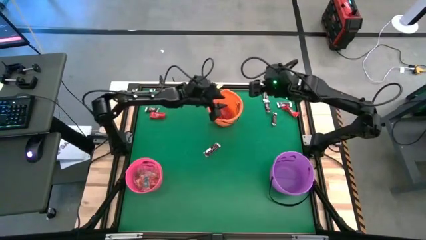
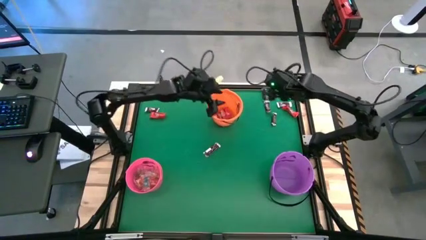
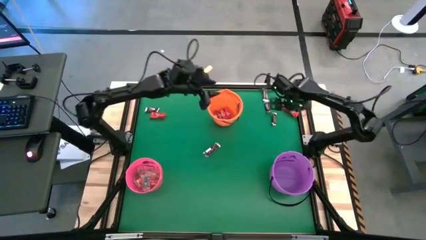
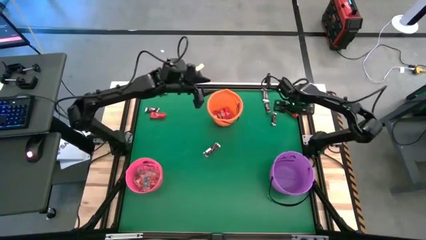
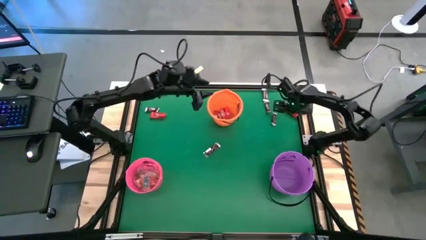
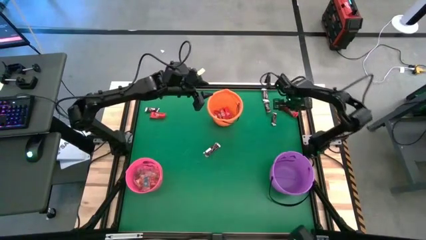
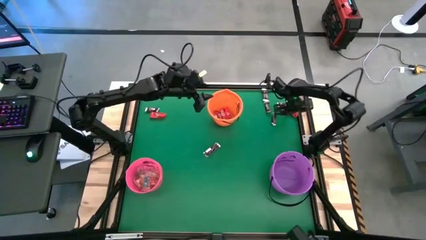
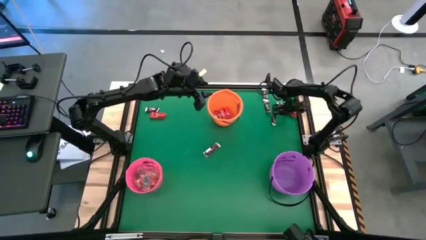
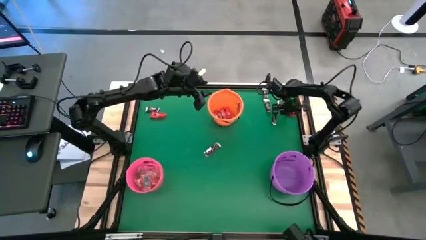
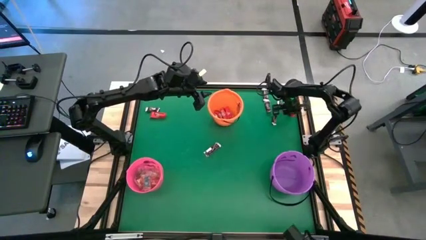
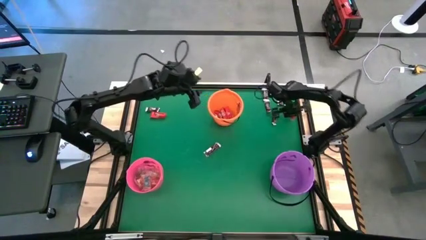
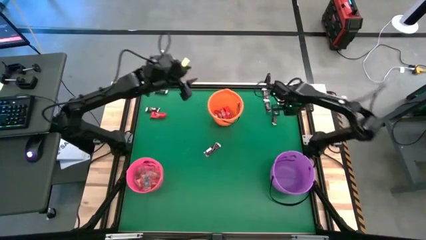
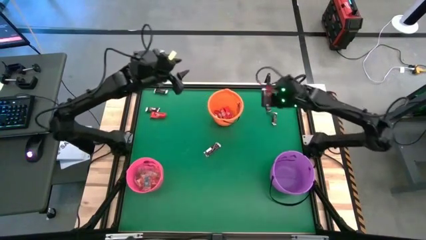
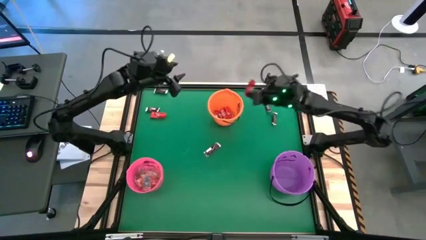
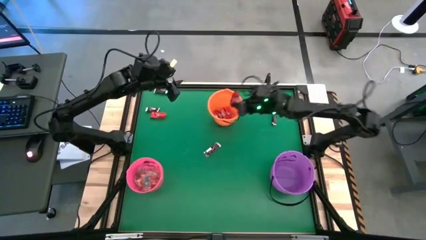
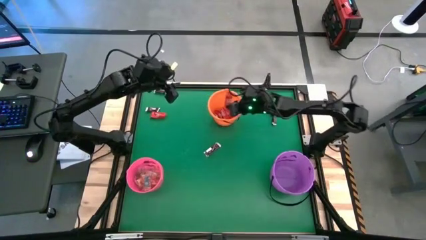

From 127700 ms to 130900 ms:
Task: Sort candy by brand, put in halloween buckets
Put the red chocolate into the orange bucket

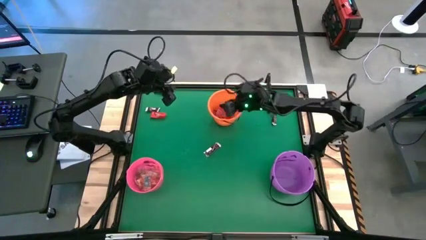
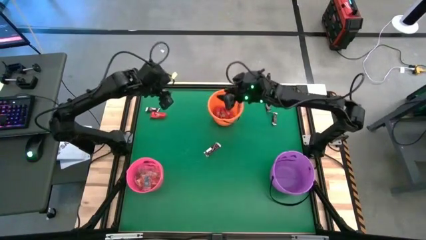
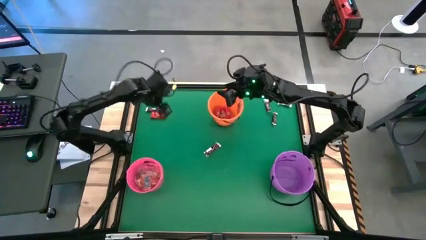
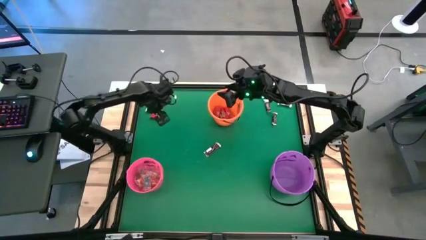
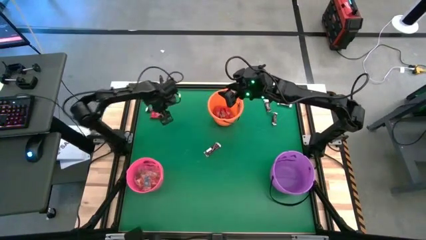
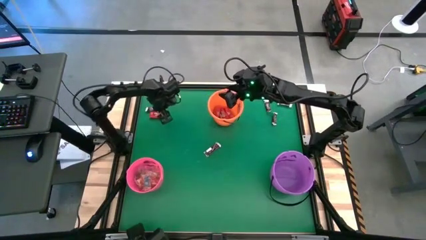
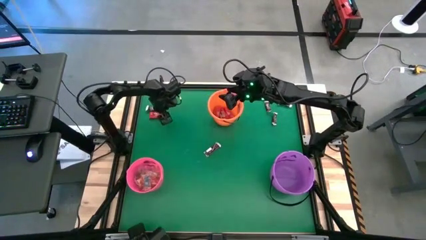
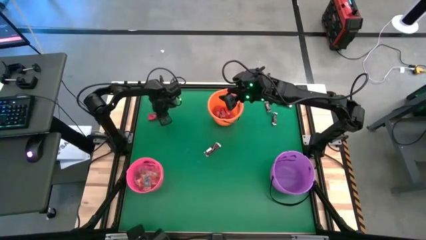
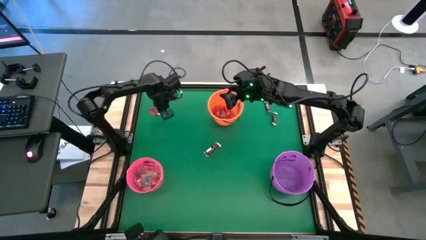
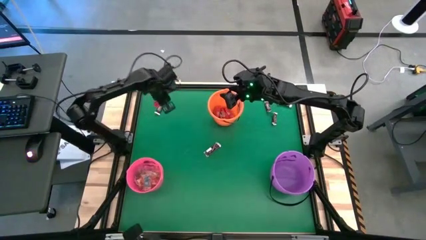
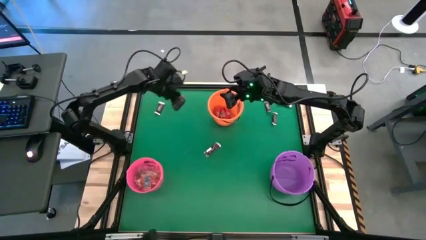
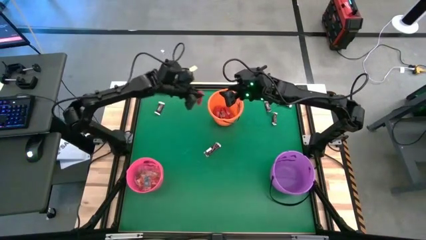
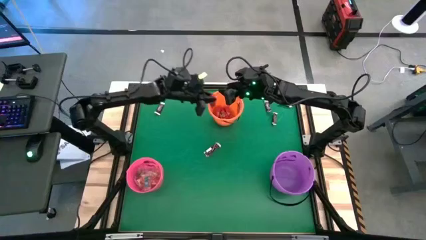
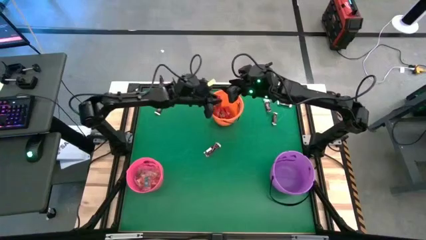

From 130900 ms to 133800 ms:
Put the red chocolate into the orange bucket

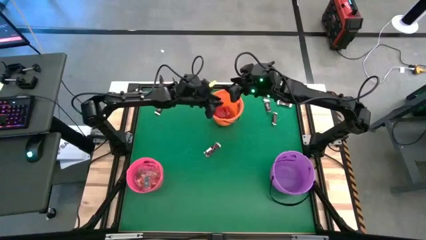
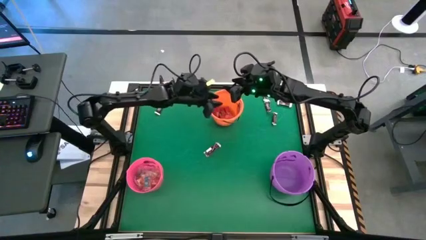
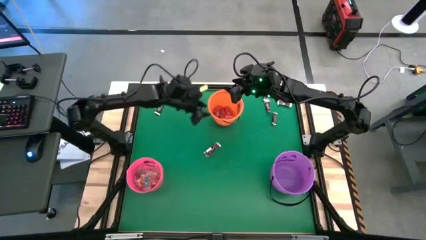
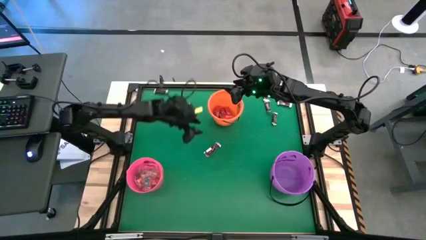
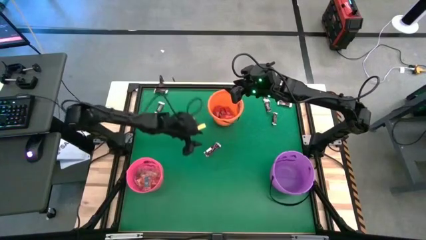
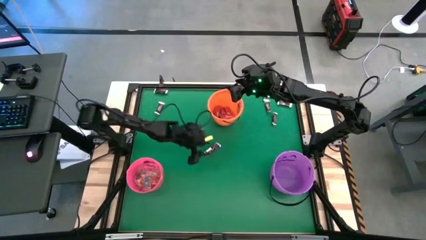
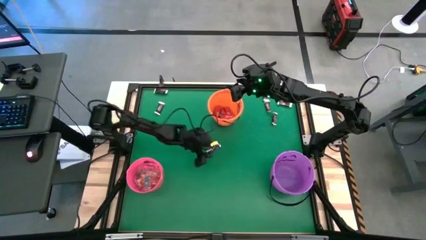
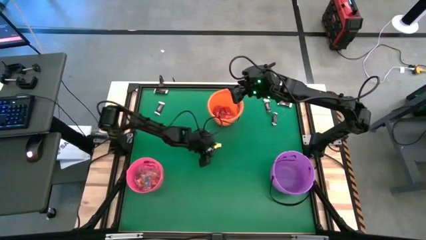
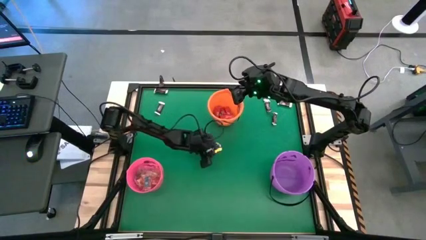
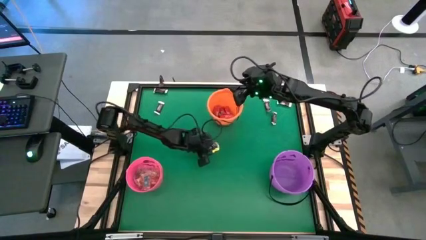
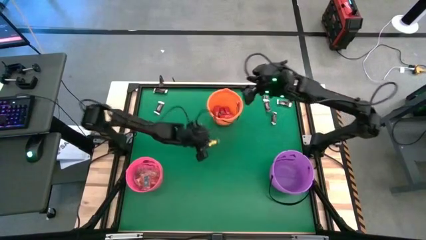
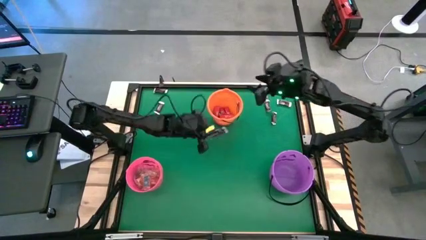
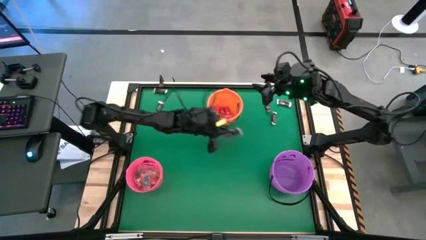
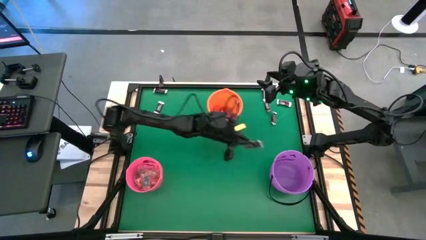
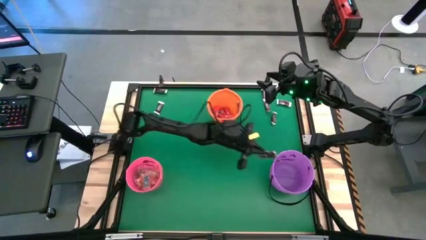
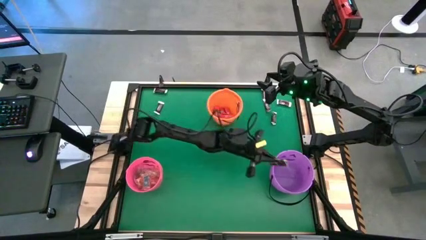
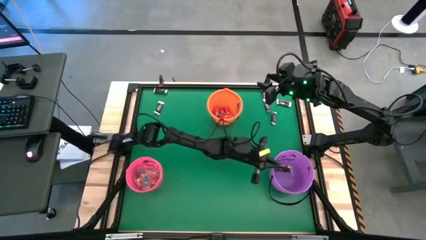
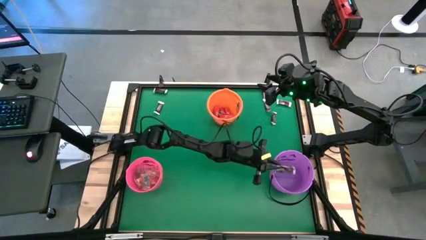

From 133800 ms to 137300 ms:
Put the brown chocolate into the violet bucket

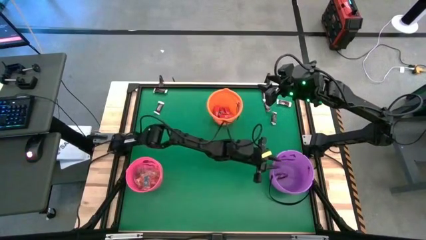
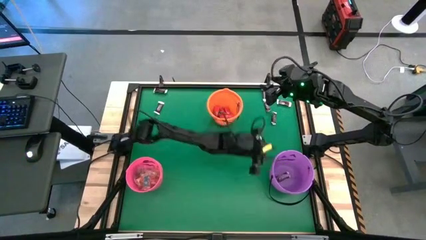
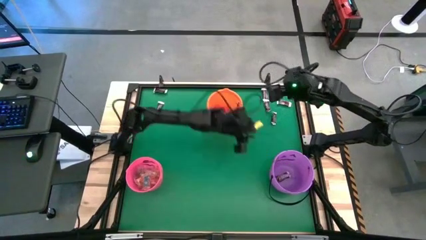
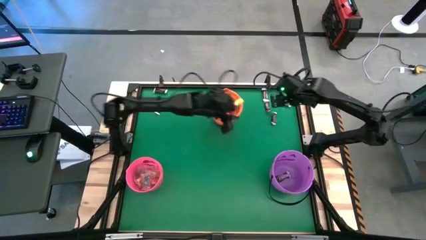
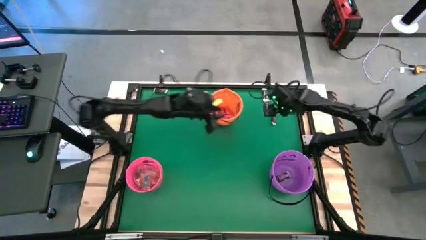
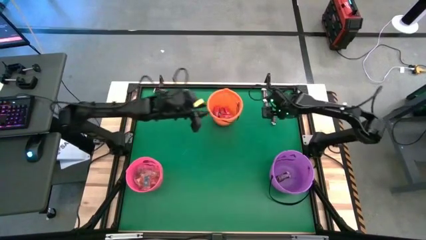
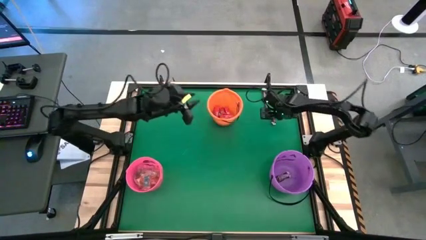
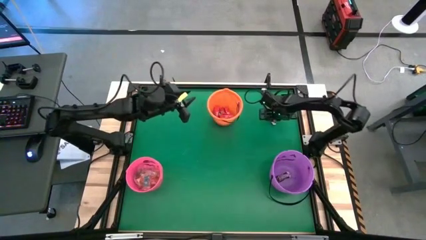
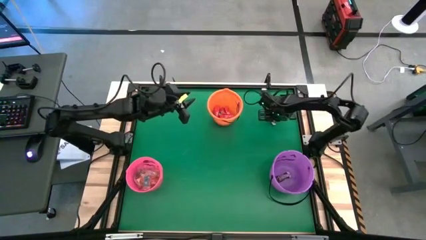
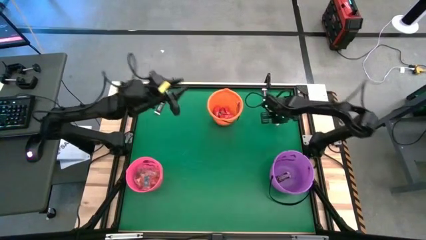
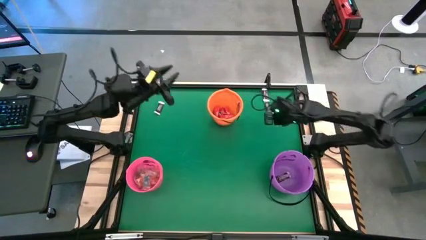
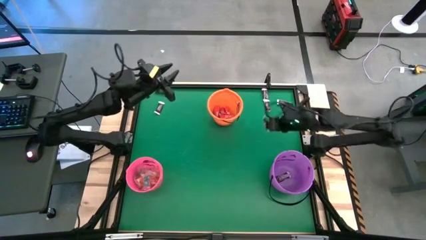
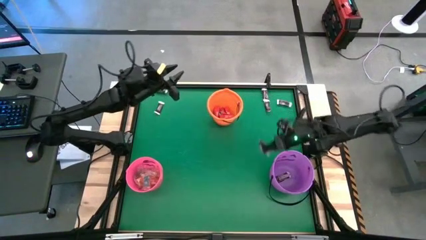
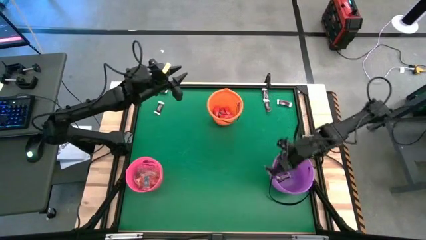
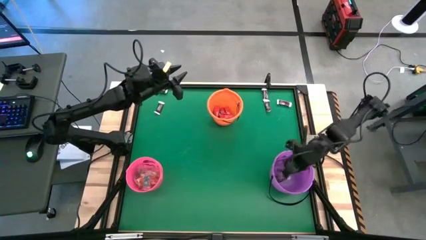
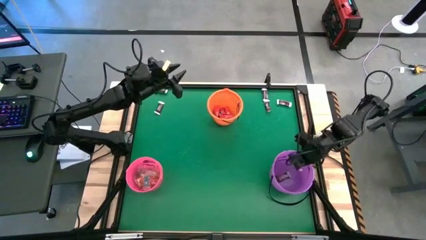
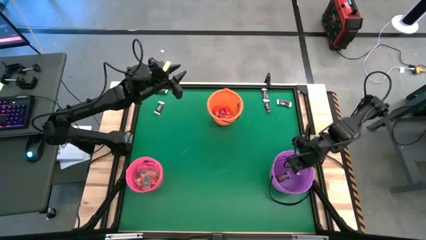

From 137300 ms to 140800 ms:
Put the brown chocolate into the violet bucket

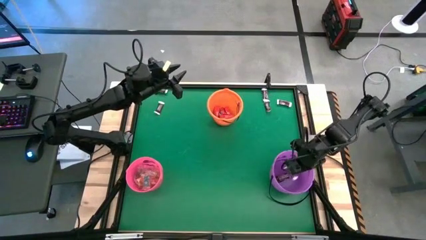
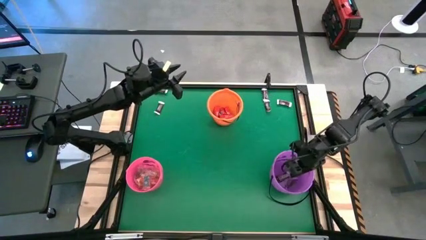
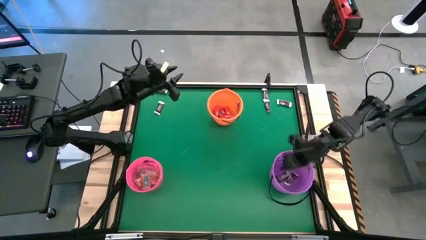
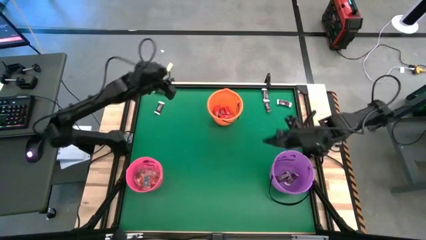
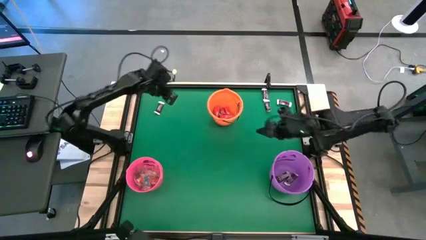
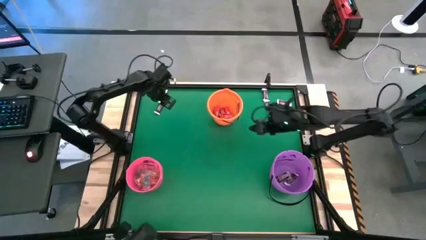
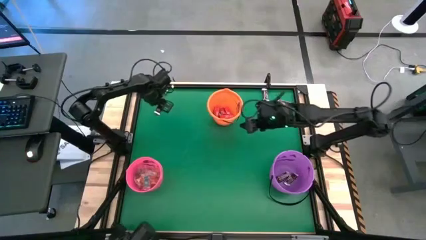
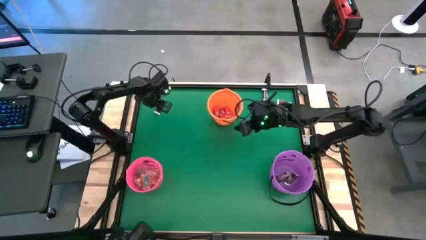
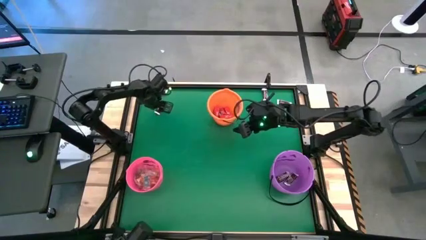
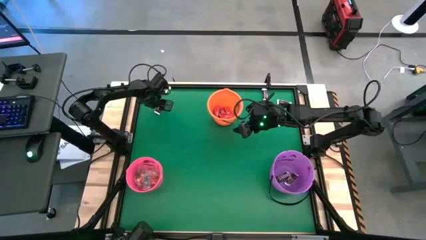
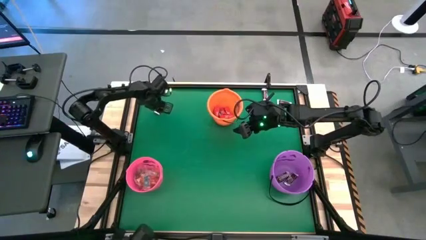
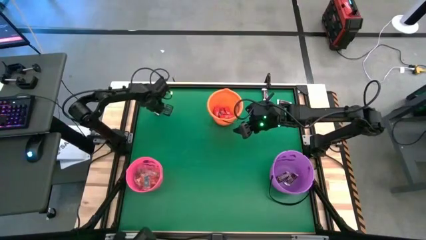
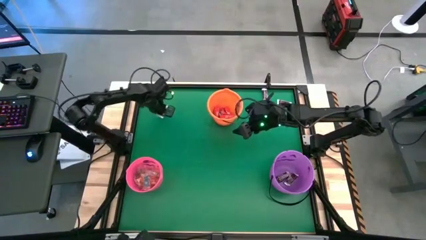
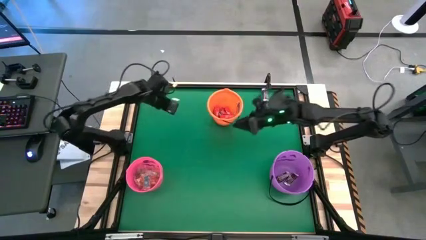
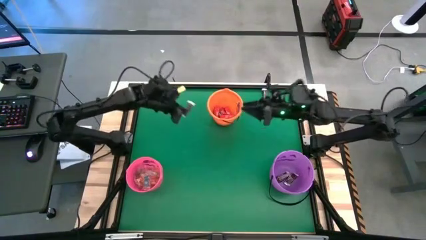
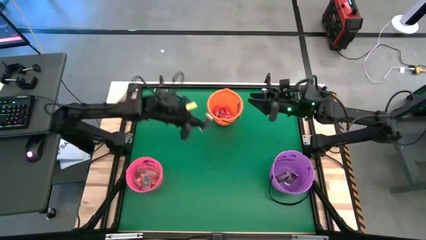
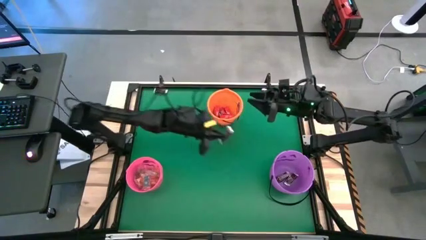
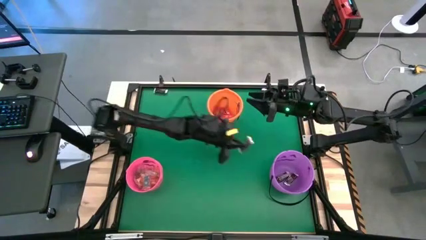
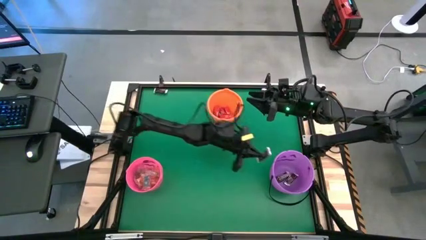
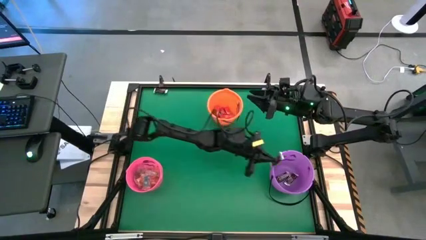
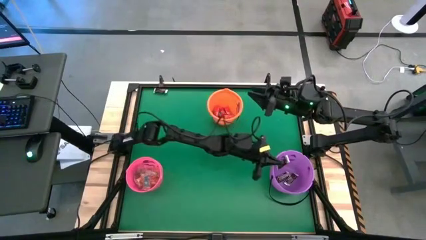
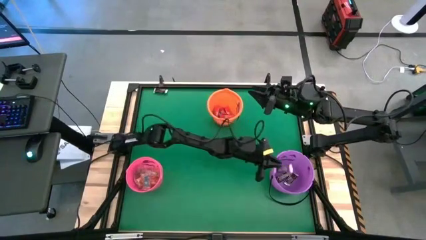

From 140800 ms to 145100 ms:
Put the brown chocolate into the violet bucket
